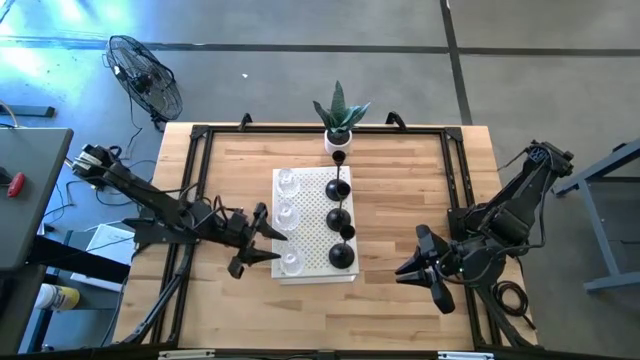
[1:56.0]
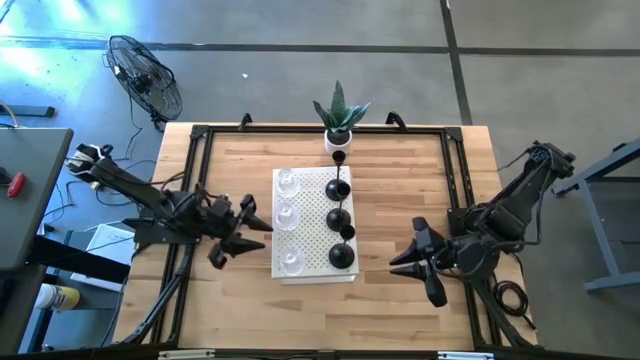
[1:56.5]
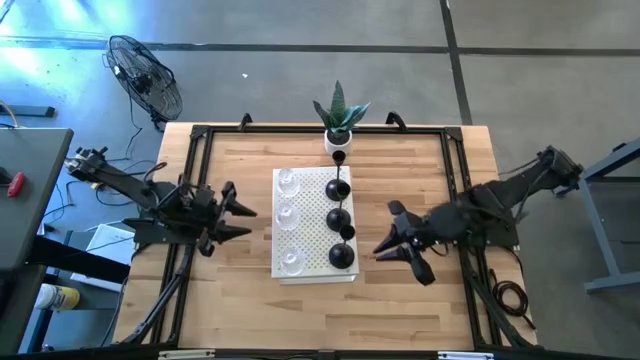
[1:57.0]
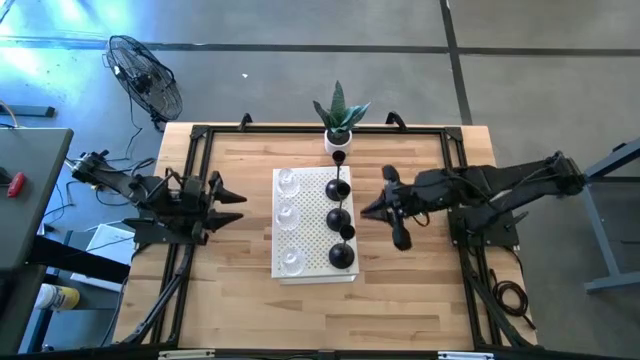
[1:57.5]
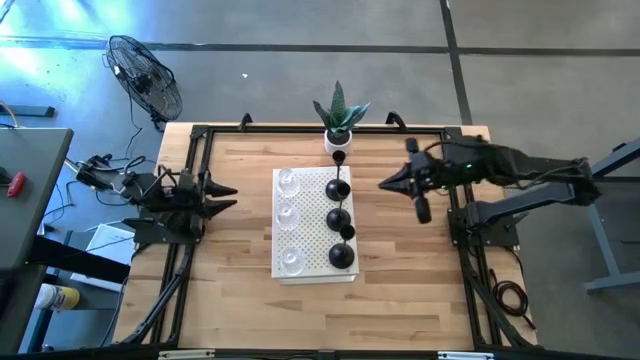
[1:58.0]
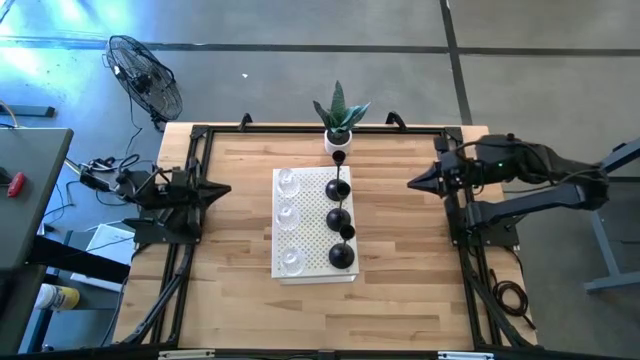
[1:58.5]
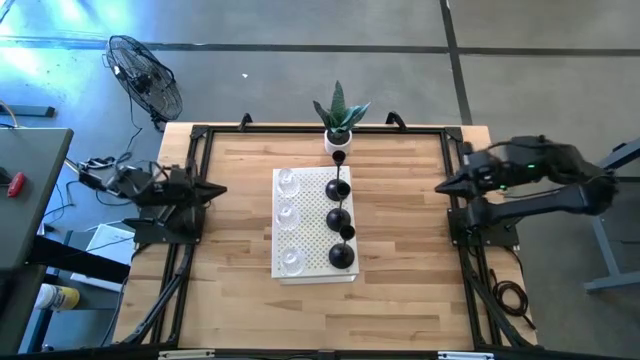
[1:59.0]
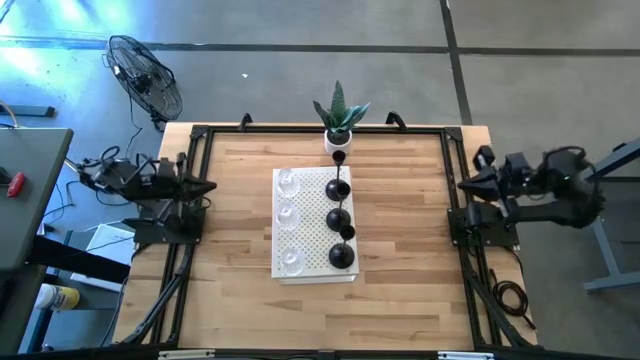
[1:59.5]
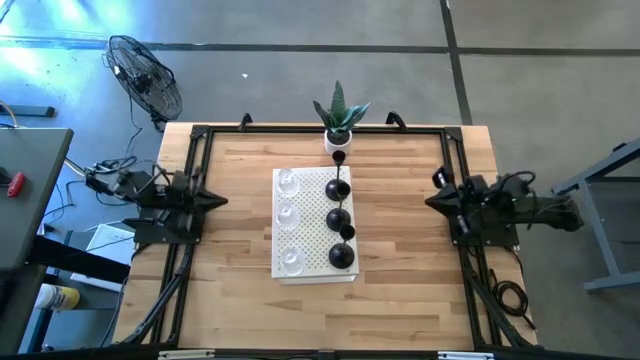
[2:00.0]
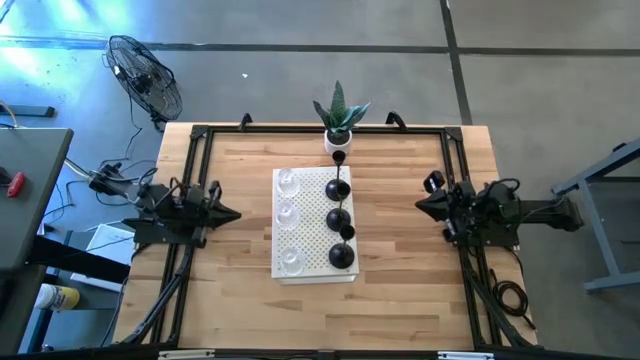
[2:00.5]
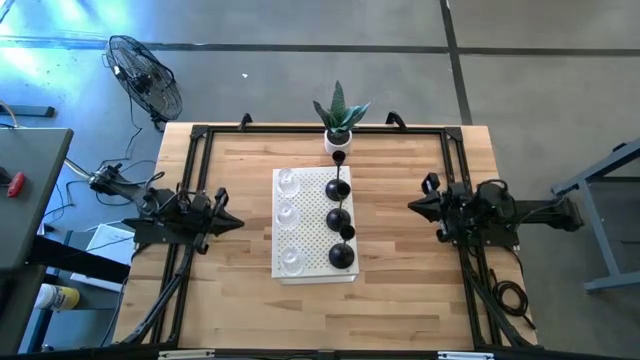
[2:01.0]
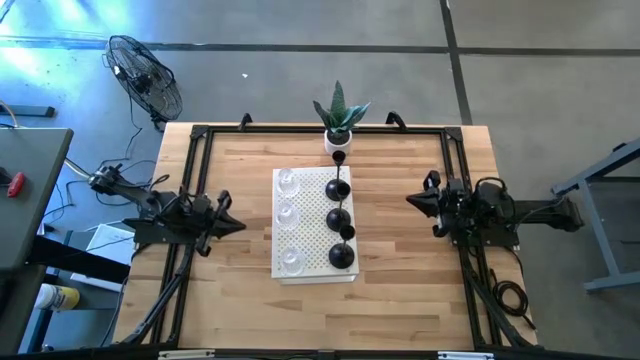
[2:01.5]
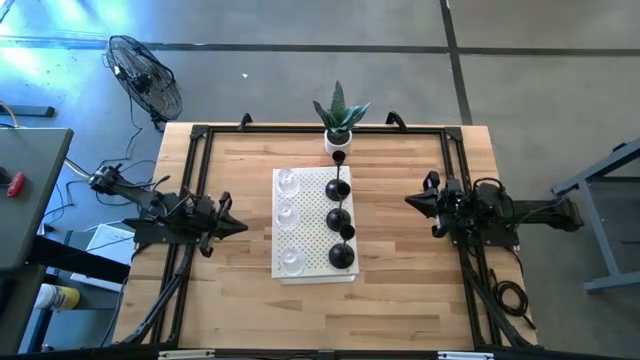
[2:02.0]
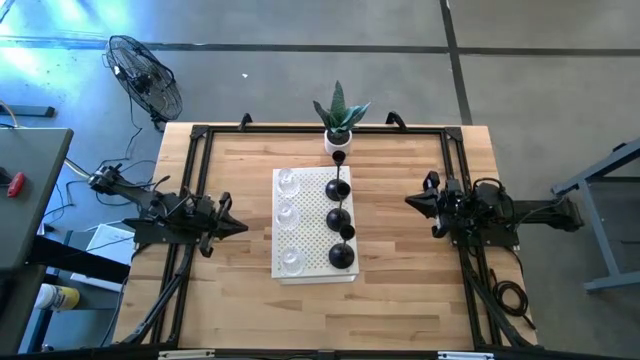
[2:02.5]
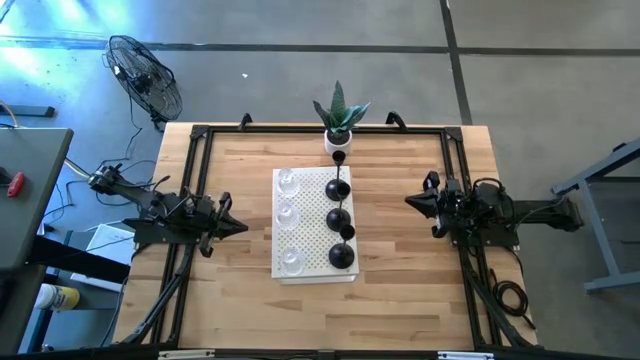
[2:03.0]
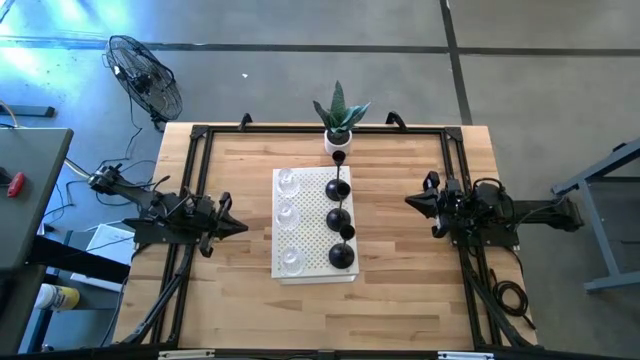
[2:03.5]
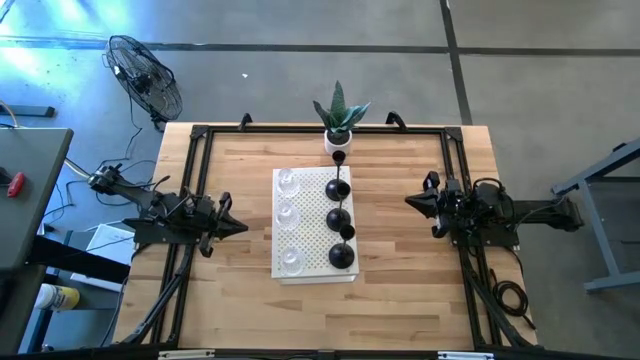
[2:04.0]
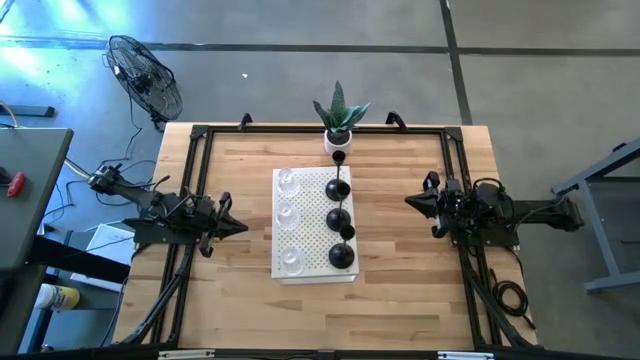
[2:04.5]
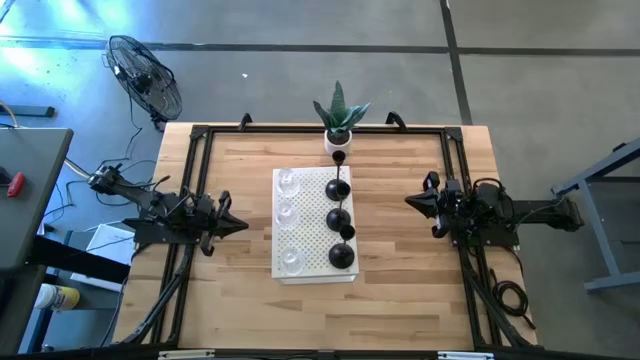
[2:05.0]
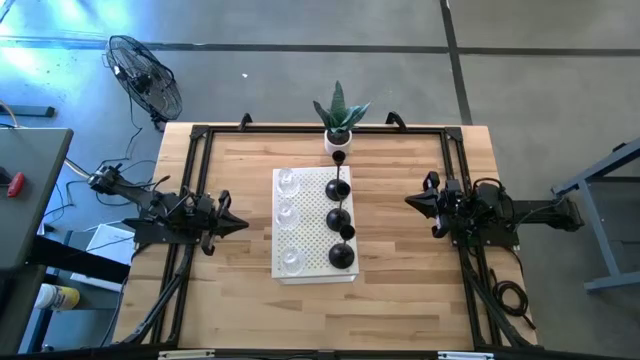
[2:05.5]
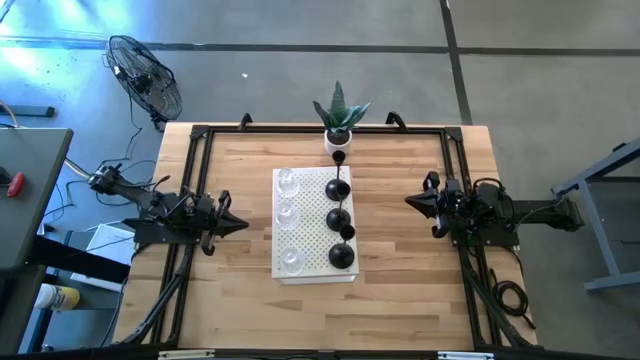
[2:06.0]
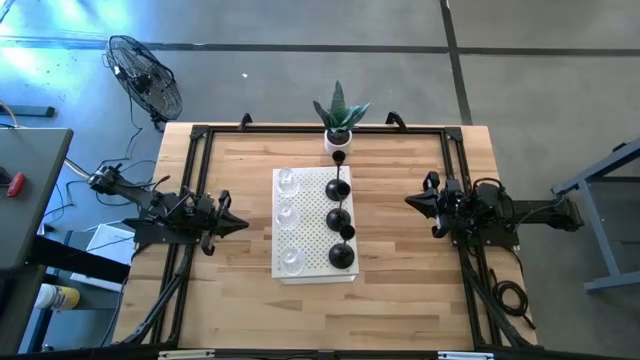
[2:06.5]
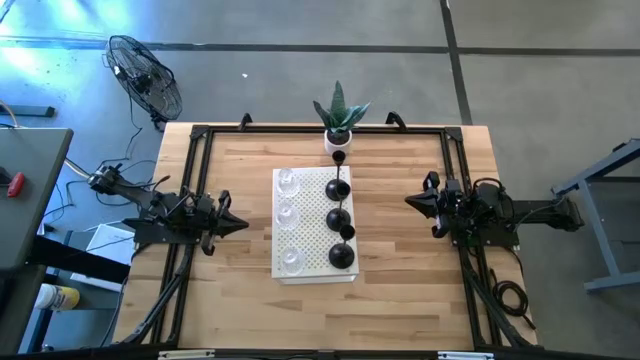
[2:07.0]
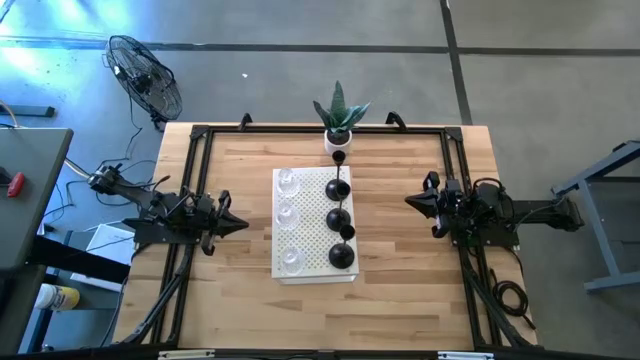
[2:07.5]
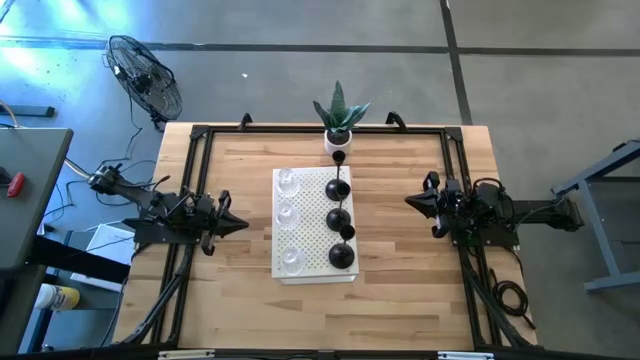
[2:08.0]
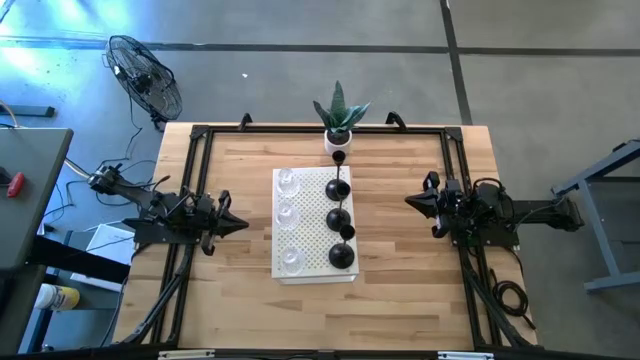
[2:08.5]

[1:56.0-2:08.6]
Task: Pick & Place candle stick holders
Return to Home Position

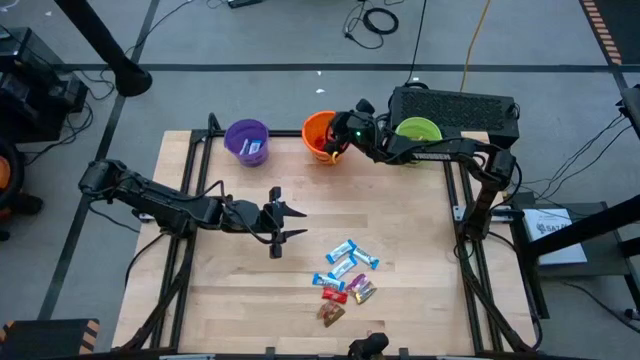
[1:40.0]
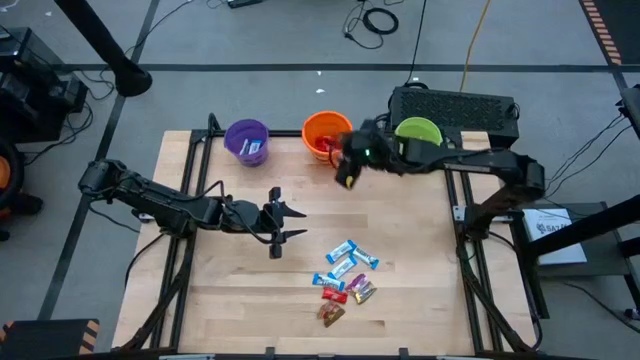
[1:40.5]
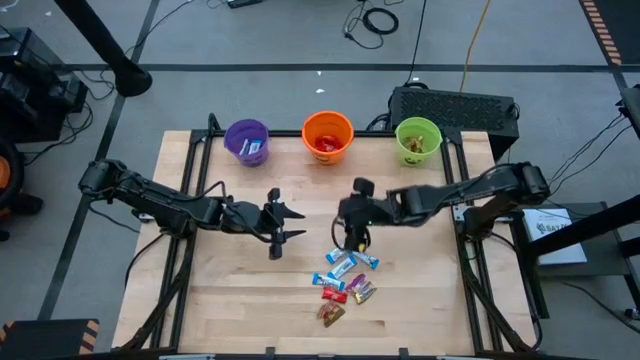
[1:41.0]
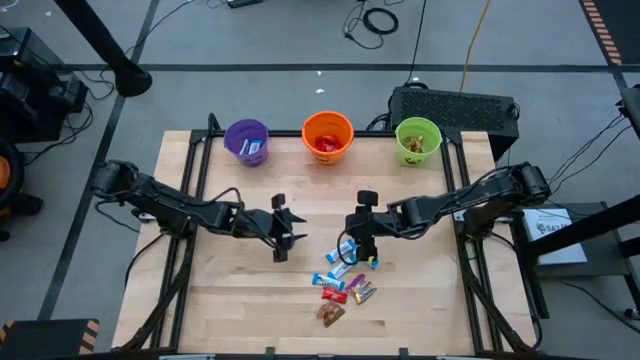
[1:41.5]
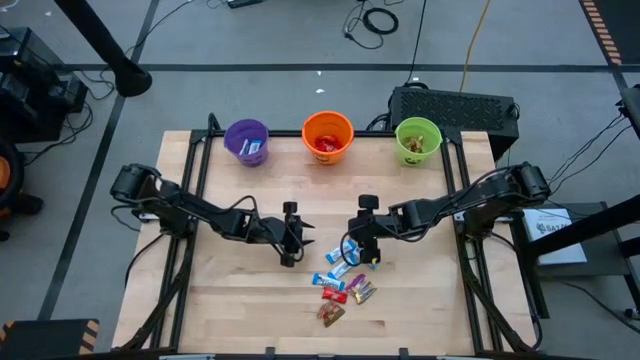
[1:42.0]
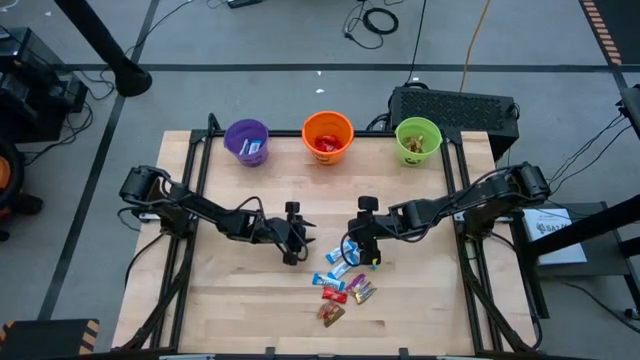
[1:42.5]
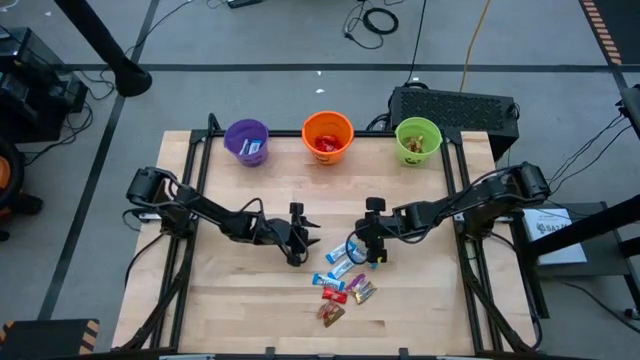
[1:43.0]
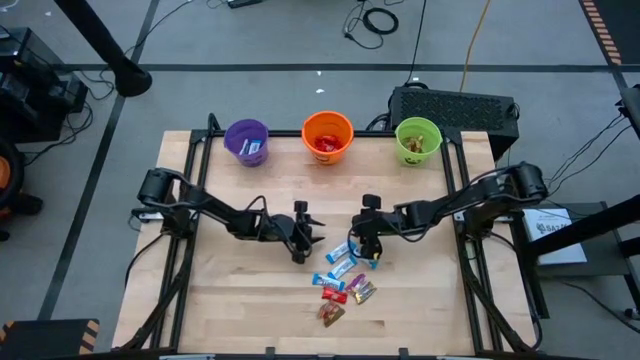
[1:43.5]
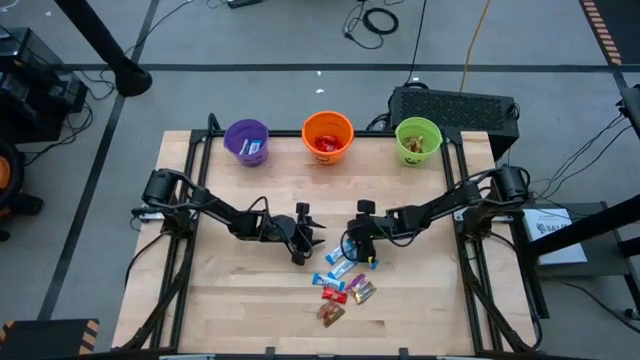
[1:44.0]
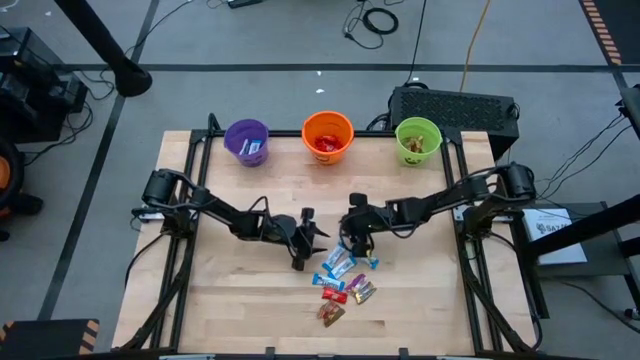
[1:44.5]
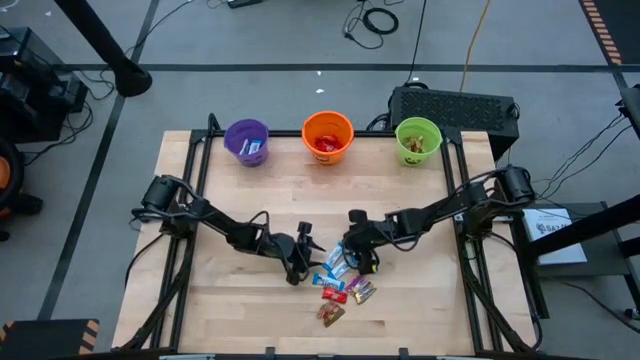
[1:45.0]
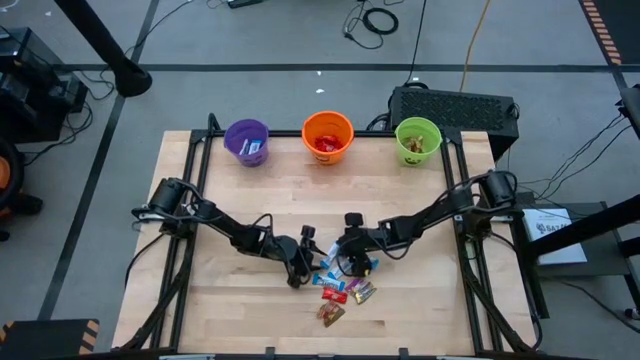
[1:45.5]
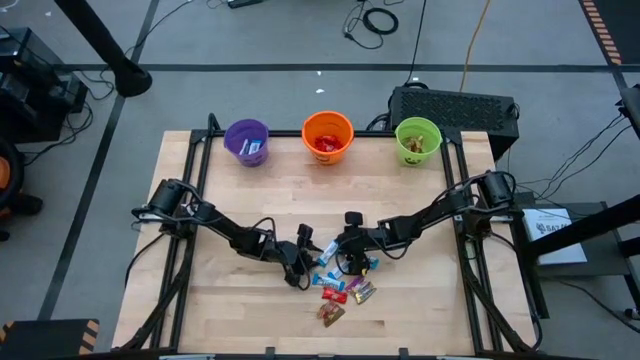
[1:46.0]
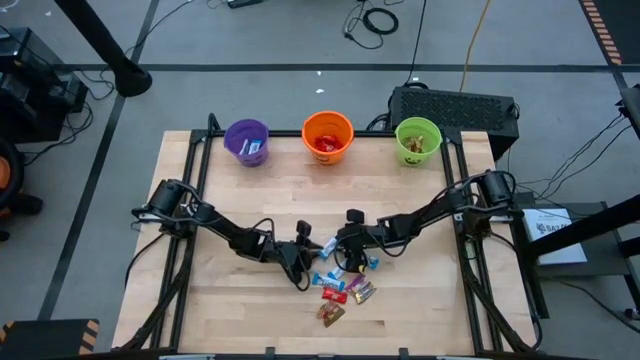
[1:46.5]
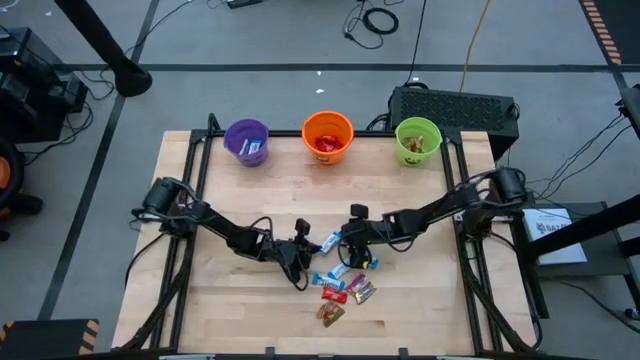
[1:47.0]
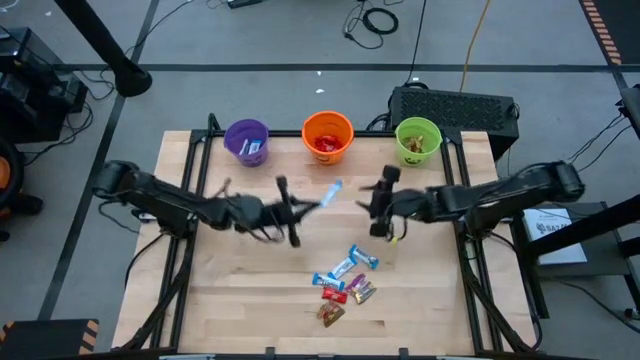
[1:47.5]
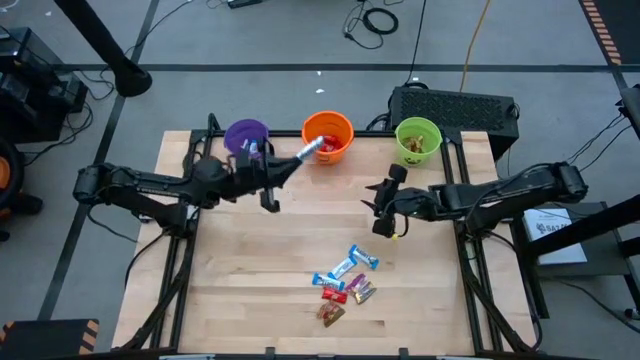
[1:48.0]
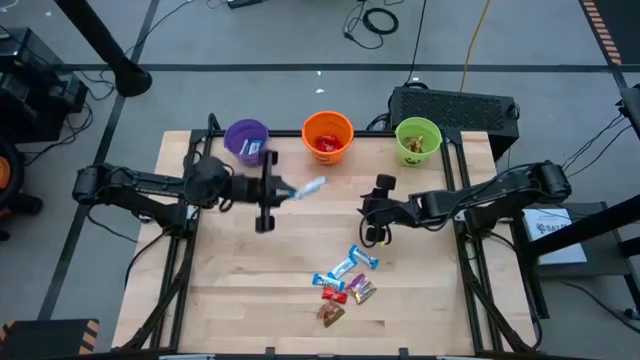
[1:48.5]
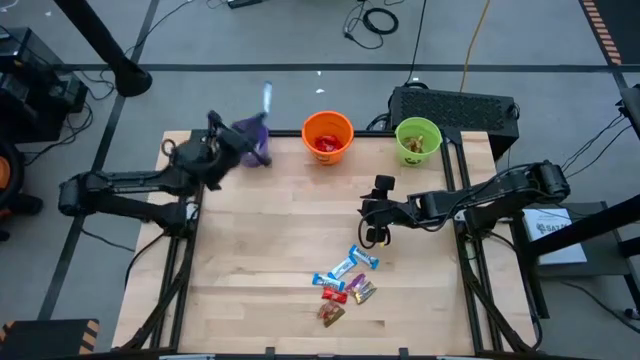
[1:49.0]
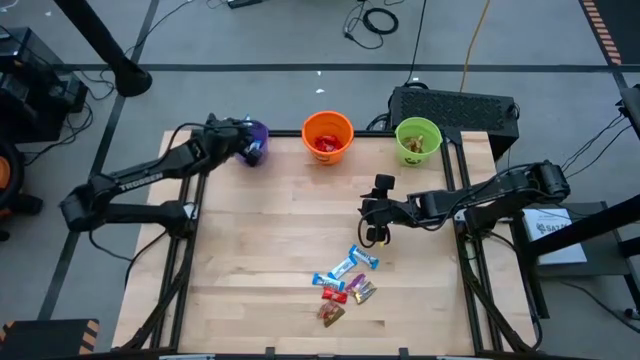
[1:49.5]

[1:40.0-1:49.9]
Task: Sort candy by brand, put in halloween buckets
Put the white chocolate into the purple bucket
